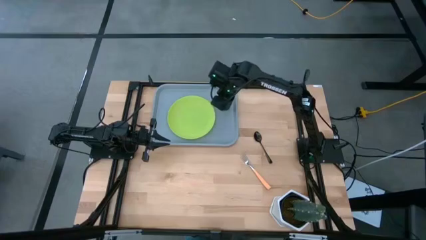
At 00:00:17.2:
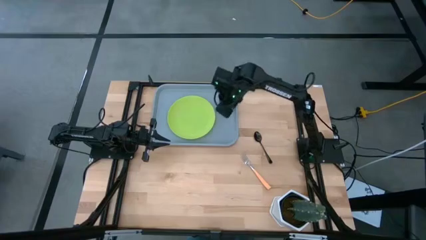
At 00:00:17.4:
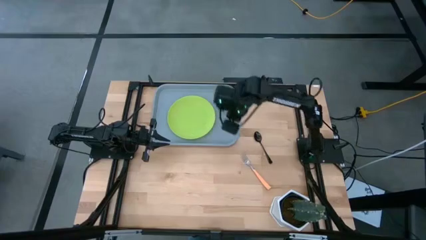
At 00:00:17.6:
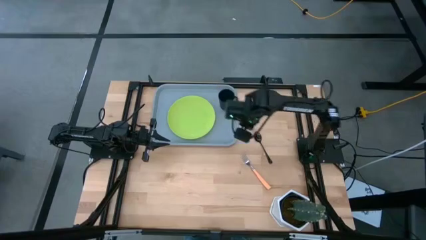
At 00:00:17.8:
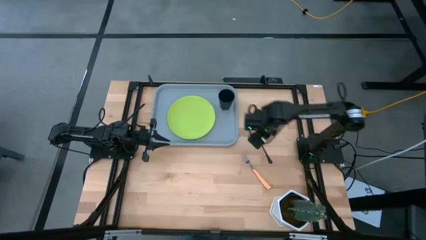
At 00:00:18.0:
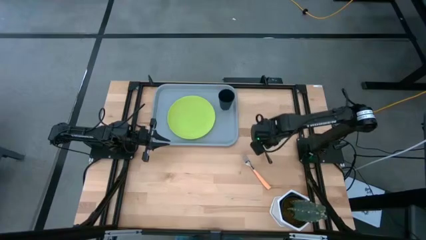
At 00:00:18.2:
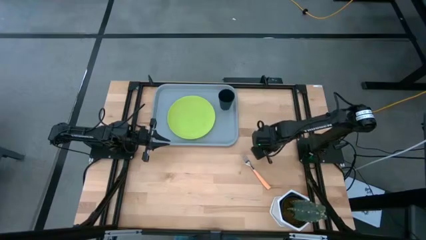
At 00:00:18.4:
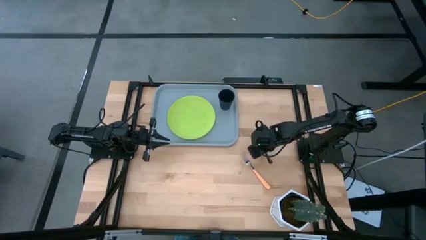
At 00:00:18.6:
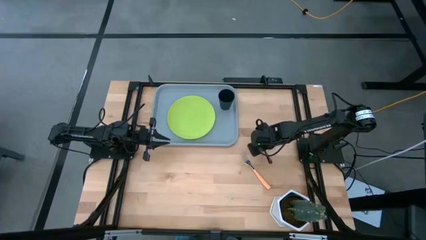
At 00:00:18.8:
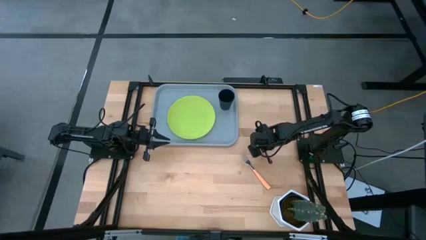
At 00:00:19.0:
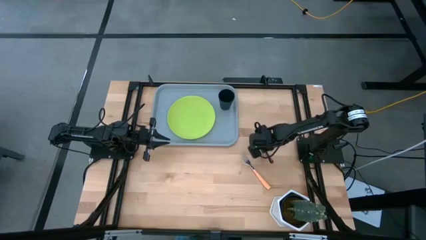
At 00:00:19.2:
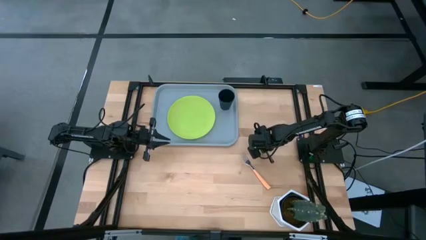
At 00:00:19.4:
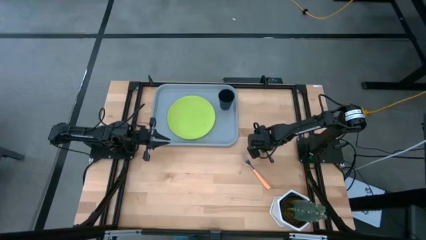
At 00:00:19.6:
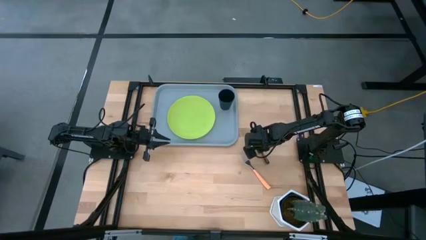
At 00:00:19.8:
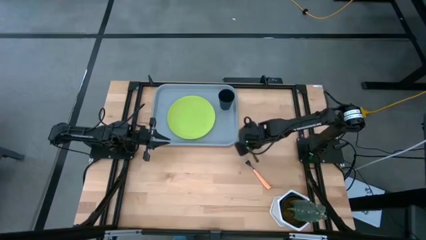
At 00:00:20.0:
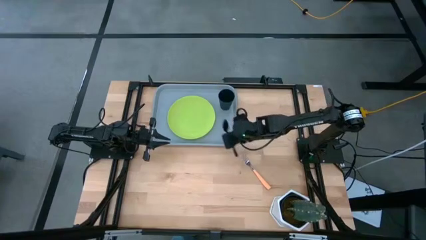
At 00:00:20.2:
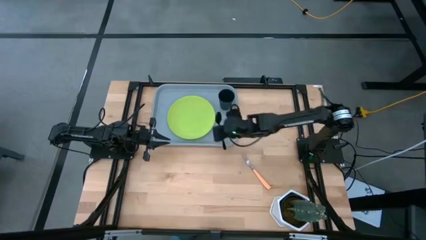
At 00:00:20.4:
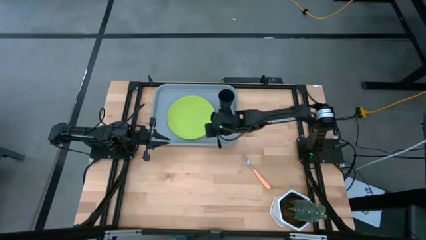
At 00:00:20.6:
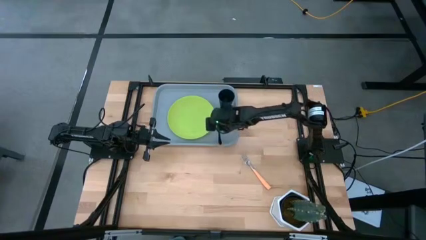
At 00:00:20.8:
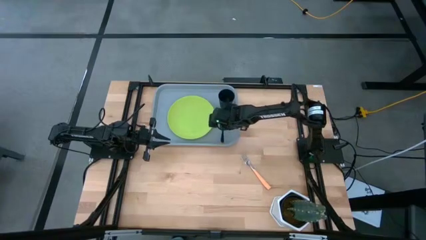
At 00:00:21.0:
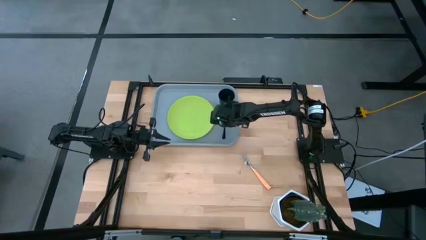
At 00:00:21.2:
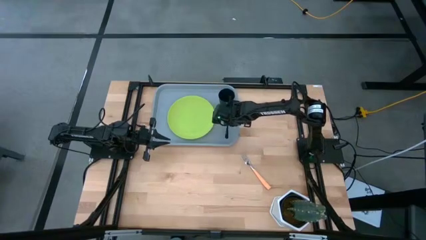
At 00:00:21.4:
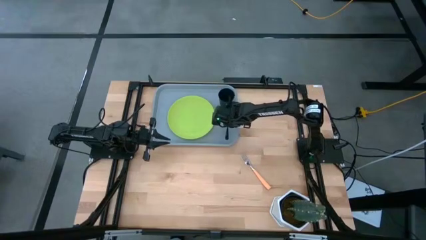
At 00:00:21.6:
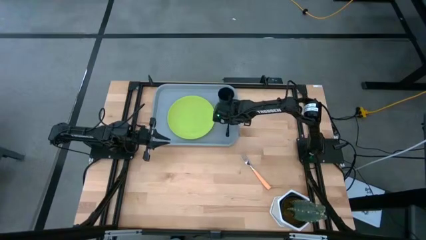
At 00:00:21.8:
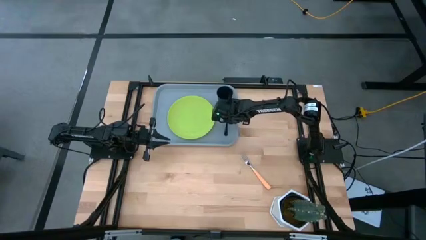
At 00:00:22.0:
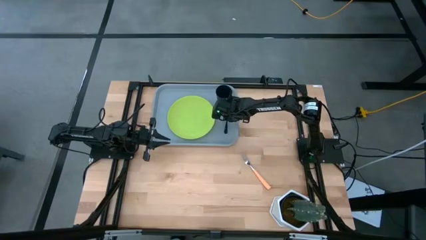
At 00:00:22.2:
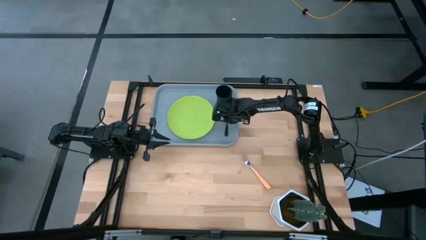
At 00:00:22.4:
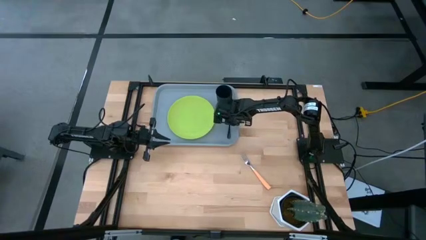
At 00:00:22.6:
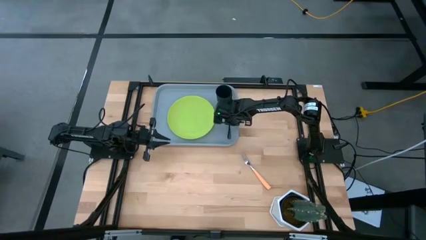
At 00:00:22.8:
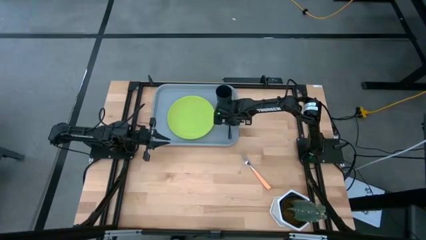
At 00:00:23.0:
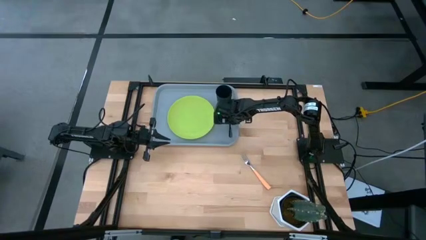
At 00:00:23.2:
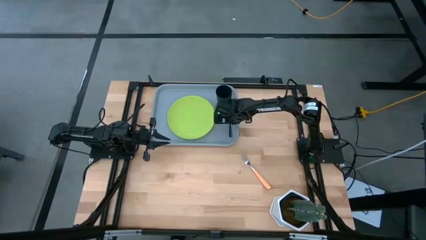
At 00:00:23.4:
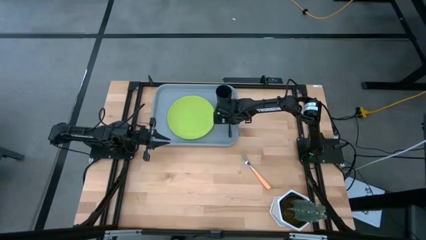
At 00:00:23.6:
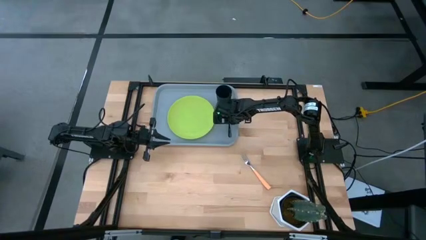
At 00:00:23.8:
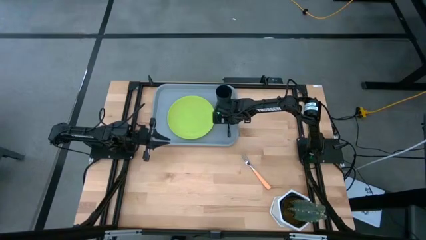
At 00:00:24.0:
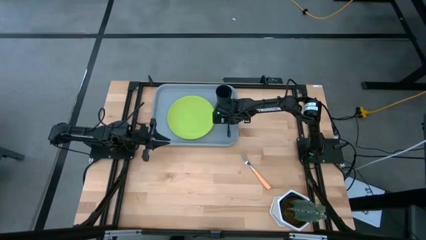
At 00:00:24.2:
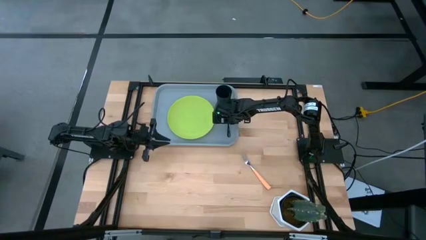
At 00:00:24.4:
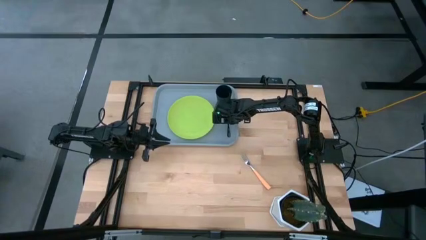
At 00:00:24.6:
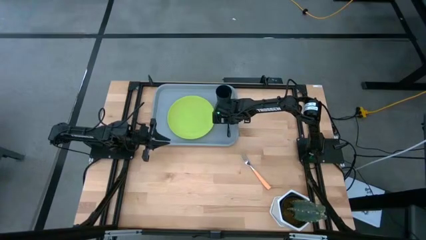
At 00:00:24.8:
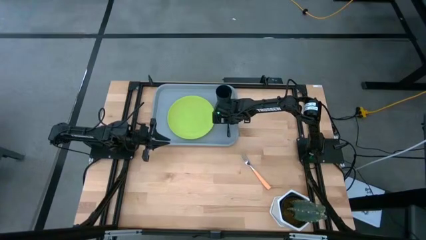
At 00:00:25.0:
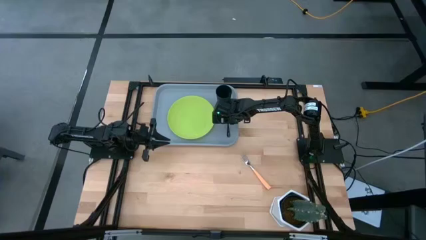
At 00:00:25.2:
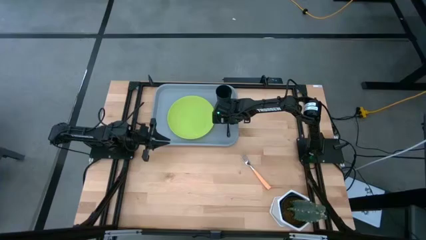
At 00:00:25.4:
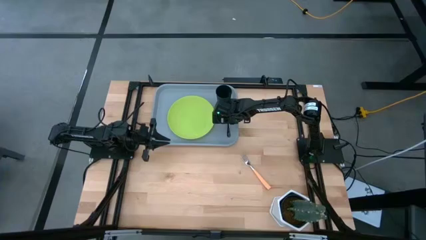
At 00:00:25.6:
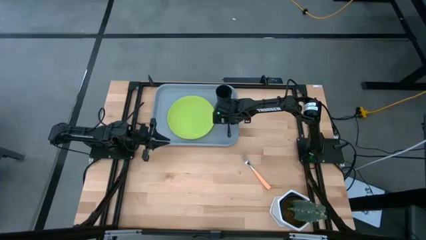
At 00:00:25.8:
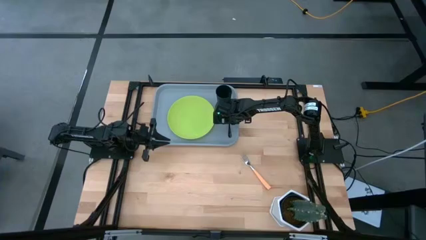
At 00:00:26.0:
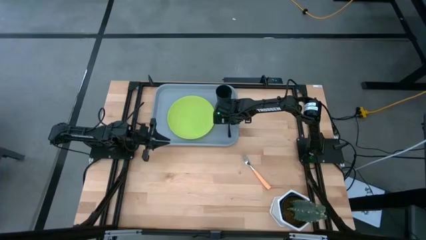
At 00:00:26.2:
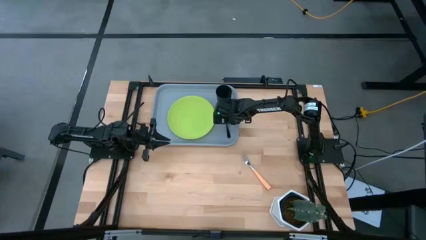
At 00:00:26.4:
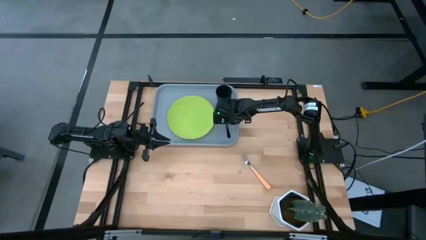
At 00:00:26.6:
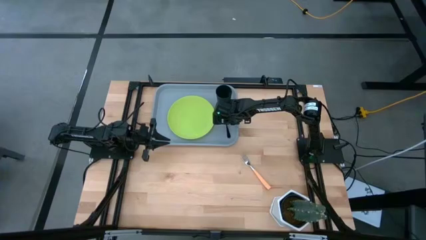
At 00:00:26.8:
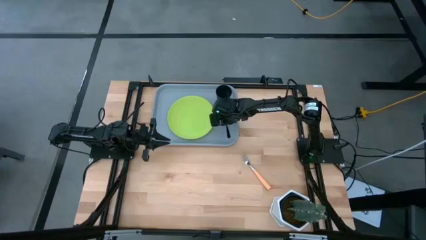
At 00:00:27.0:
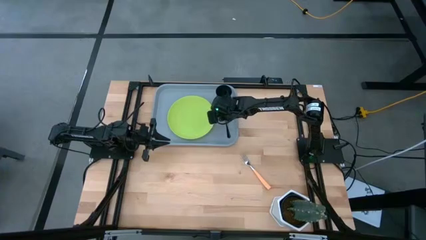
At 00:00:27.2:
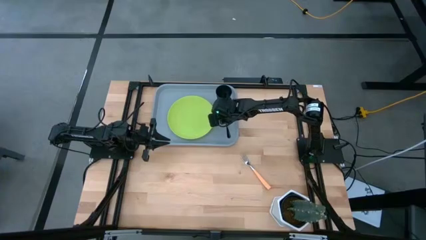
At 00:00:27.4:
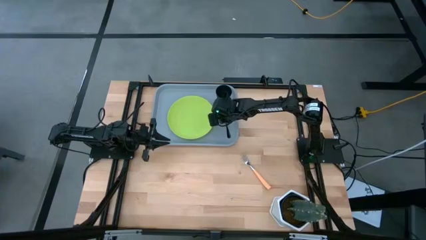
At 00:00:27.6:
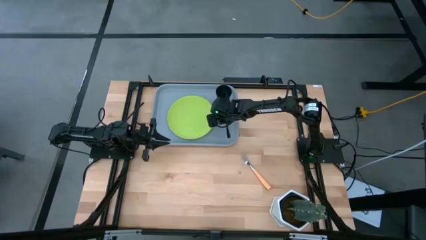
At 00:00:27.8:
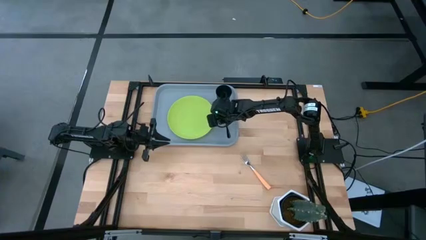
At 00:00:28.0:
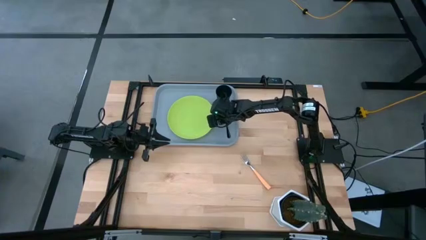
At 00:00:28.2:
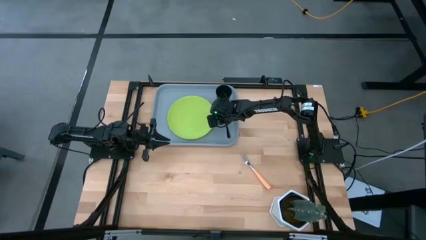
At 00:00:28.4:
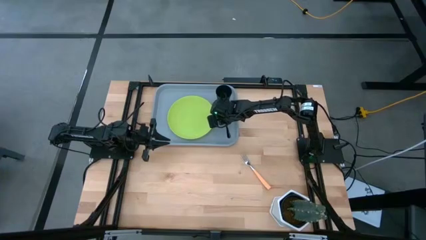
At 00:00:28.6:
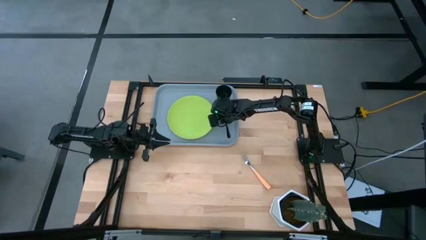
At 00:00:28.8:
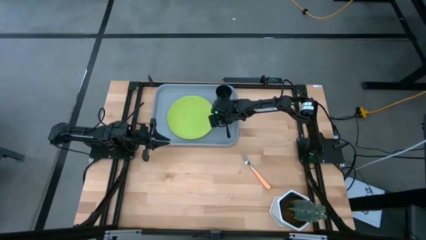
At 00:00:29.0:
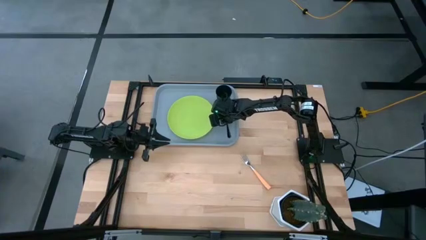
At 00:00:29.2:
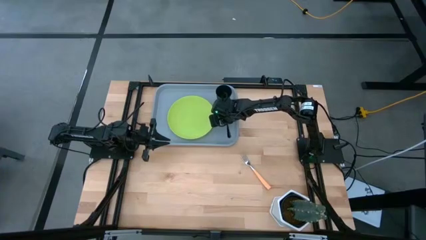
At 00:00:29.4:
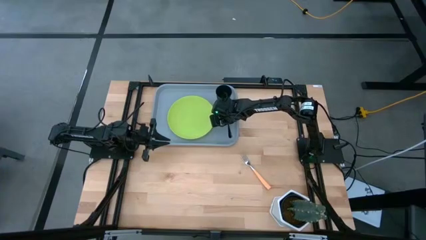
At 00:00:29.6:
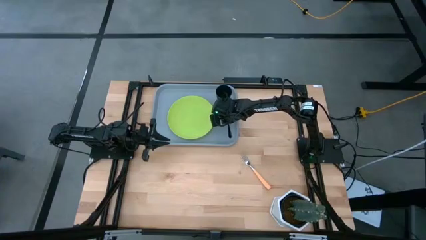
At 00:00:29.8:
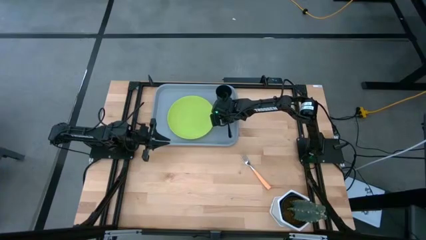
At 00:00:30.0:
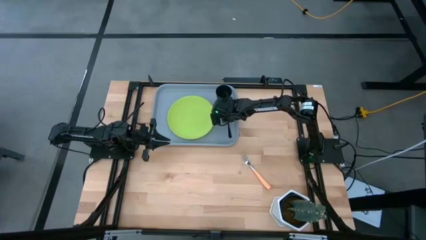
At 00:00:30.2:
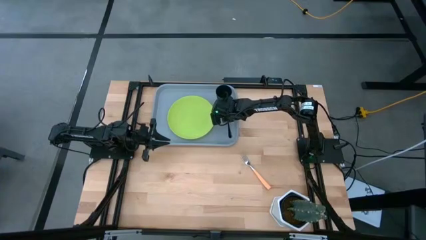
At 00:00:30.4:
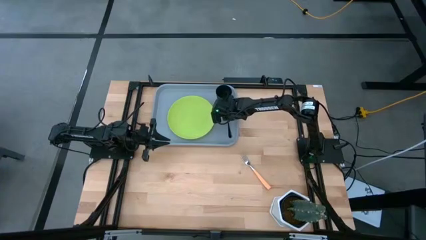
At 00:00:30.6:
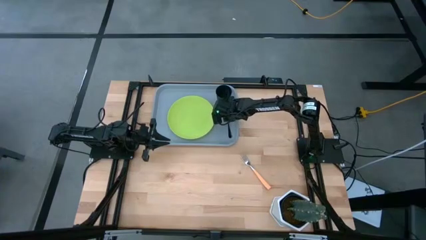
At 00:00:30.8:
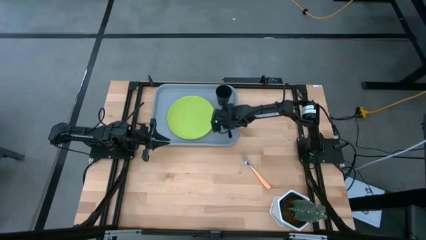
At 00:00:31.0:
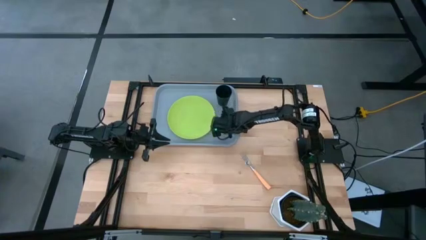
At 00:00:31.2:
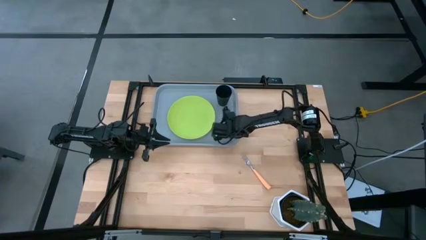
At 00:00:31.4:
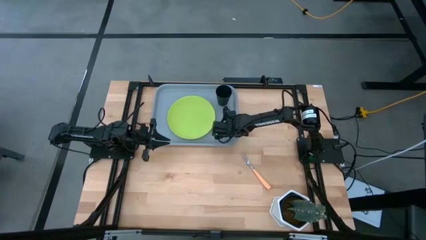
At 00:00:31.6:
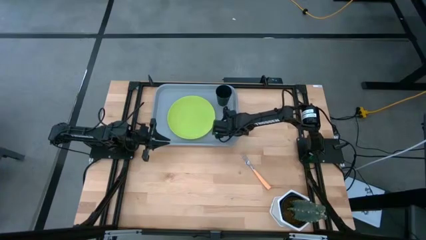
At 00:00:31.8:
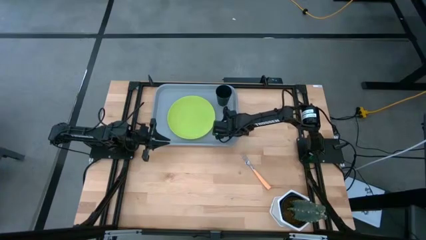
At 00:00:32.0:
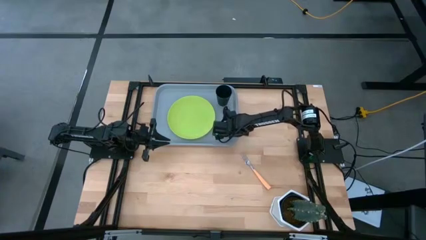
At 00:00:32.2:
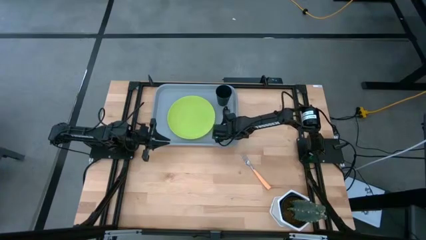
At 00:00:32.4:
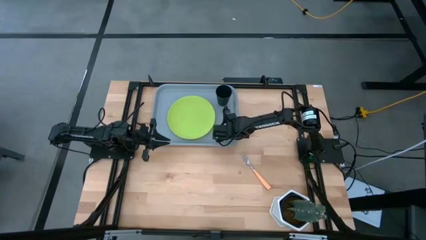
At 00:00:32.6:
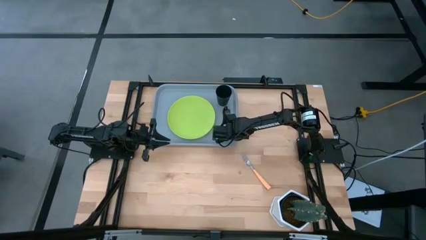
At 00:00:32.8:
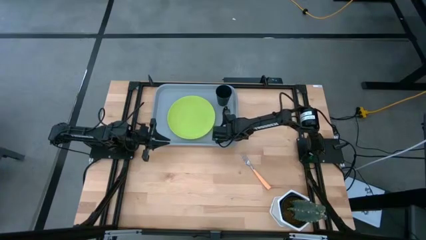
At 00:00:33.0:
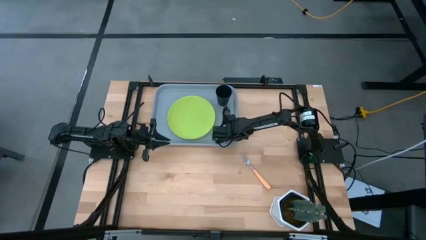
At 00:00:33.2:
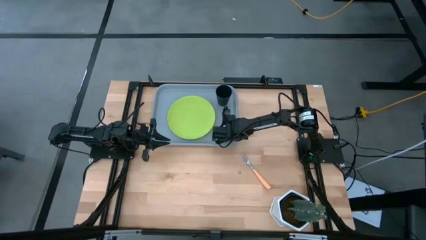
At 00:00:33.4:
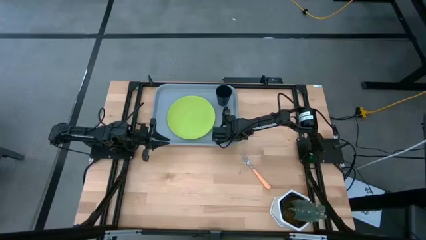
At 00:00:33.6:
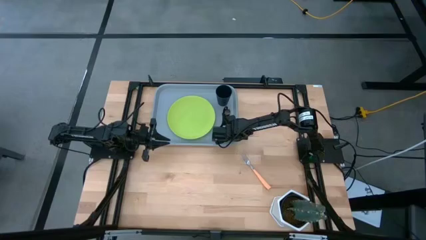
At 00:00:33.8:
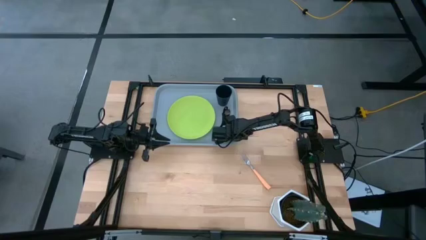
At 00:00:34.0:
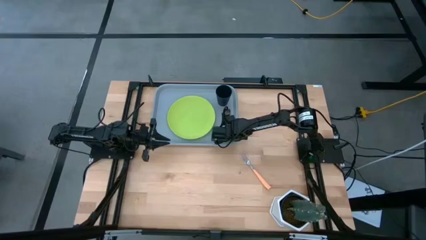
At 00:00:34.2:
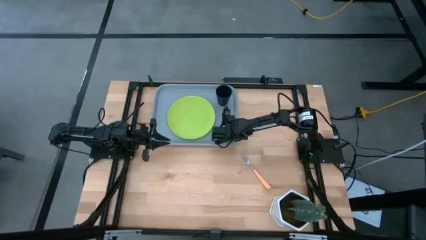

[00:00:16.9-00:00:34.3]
Task: Pick and place plate/cup/fork/spoon on tray
Put the black spoon on the gray tray to the right of the light green plate
